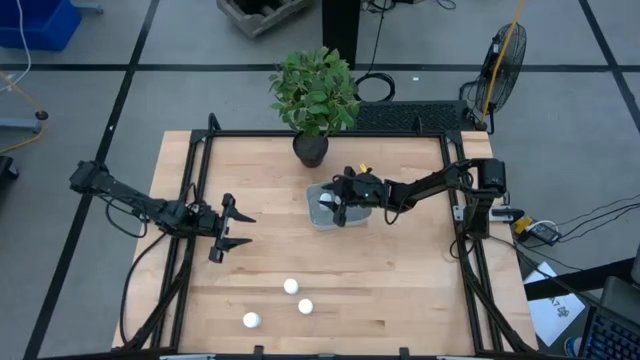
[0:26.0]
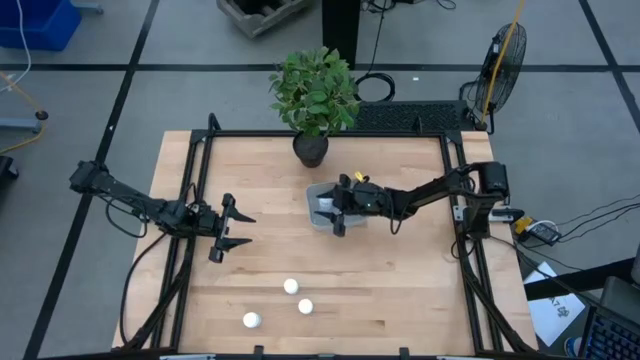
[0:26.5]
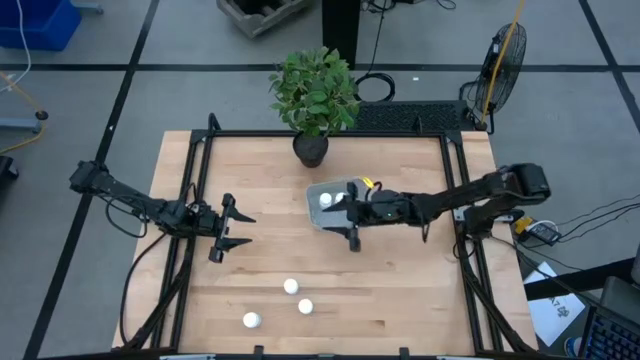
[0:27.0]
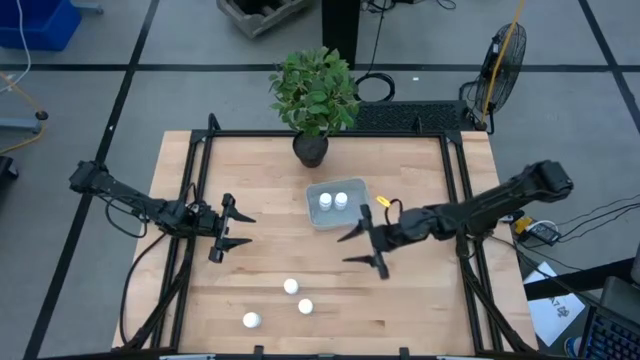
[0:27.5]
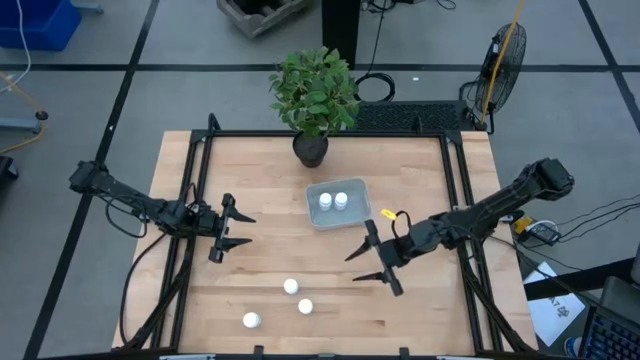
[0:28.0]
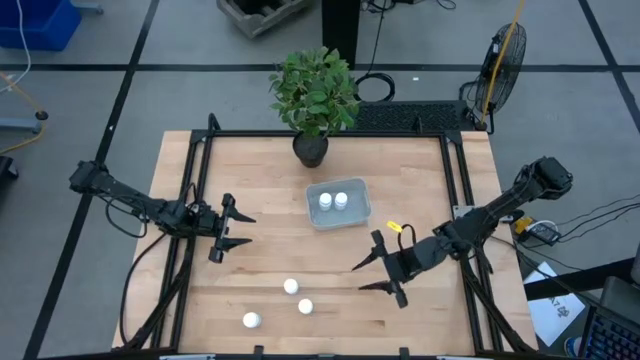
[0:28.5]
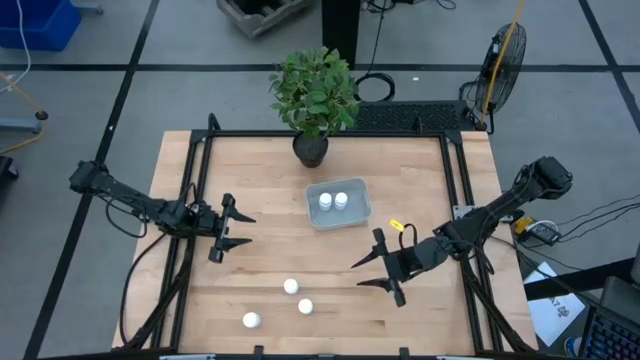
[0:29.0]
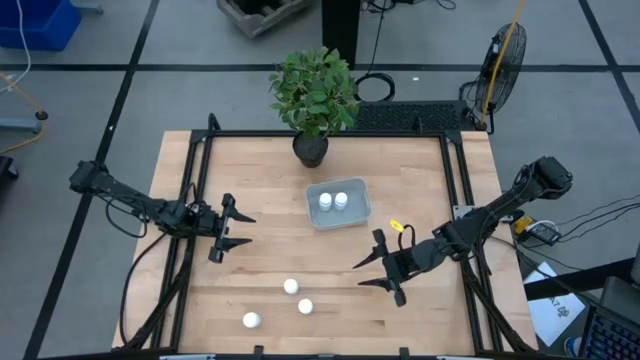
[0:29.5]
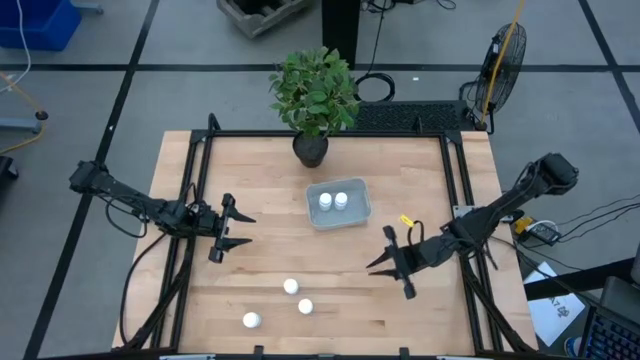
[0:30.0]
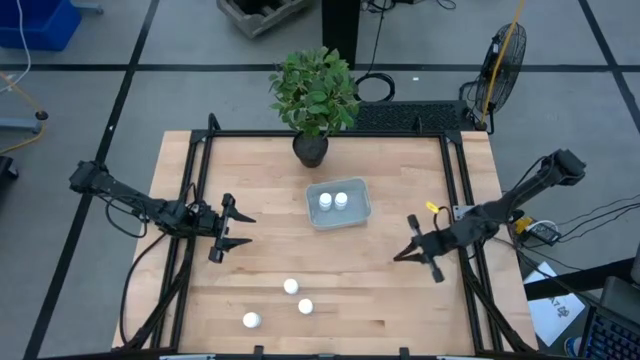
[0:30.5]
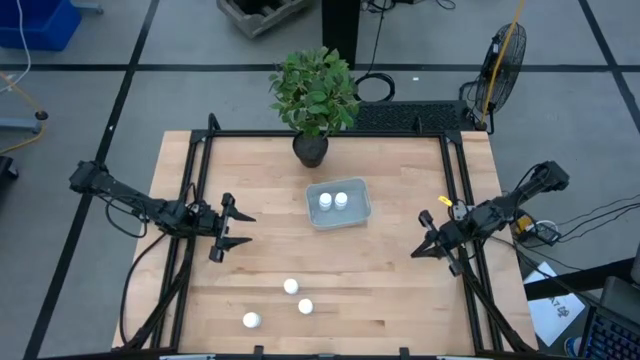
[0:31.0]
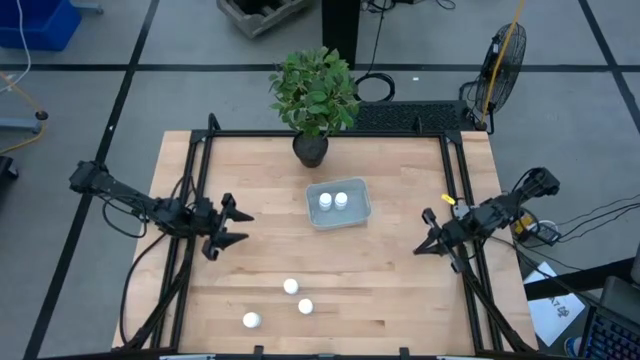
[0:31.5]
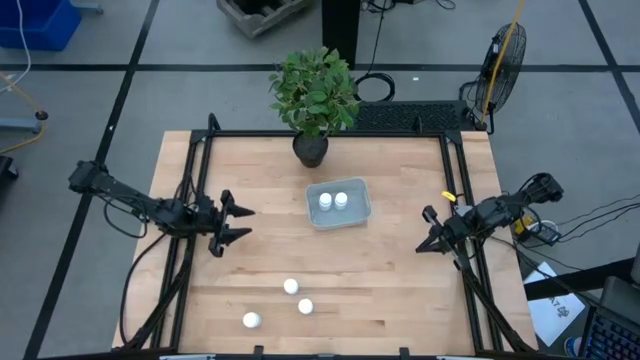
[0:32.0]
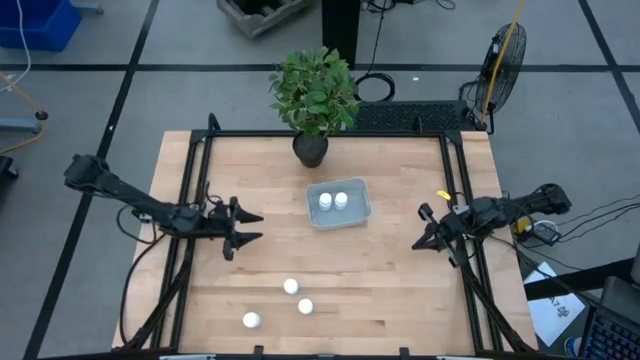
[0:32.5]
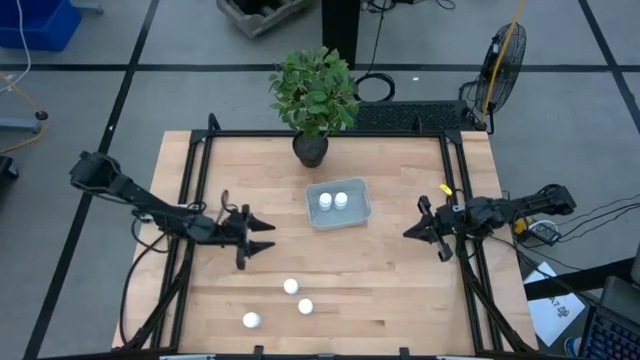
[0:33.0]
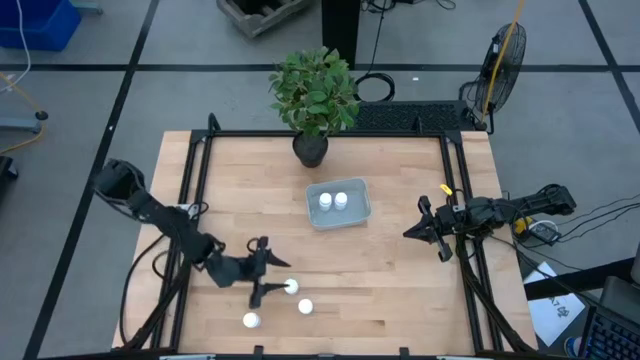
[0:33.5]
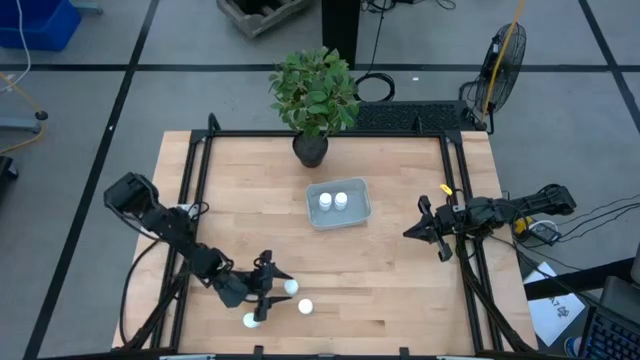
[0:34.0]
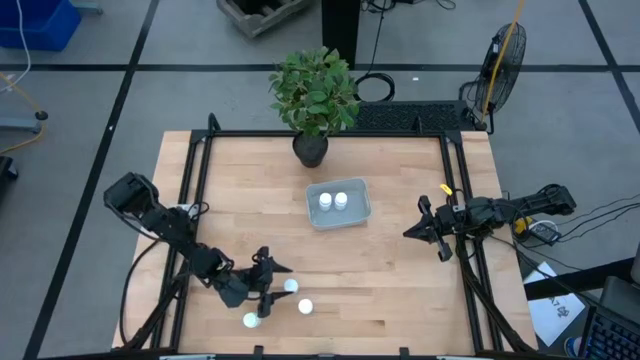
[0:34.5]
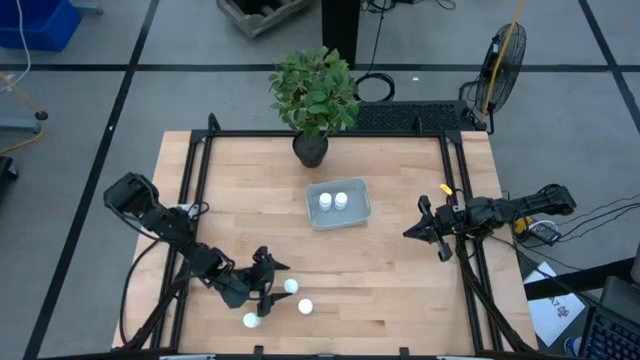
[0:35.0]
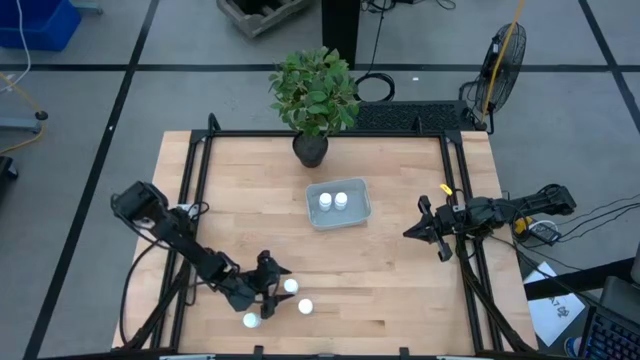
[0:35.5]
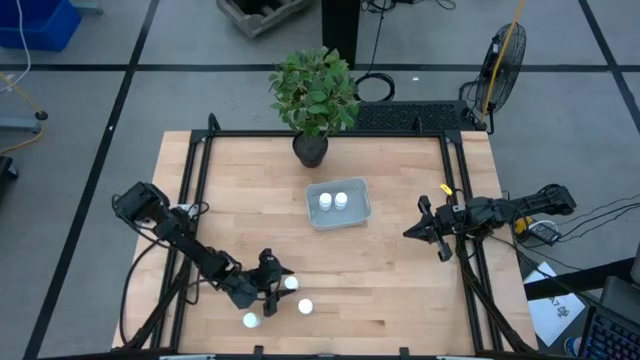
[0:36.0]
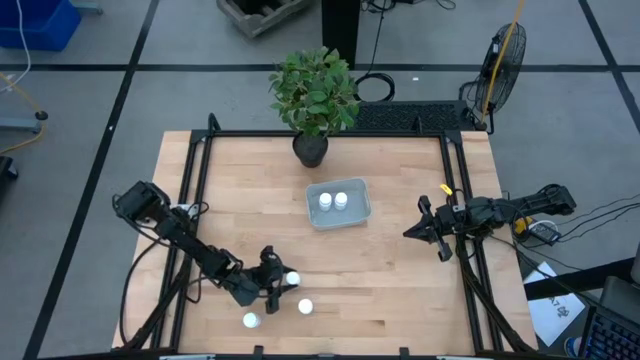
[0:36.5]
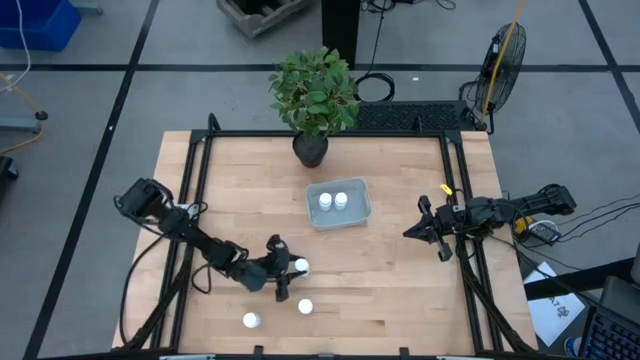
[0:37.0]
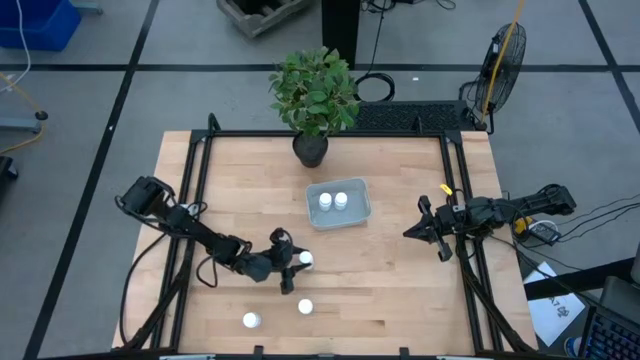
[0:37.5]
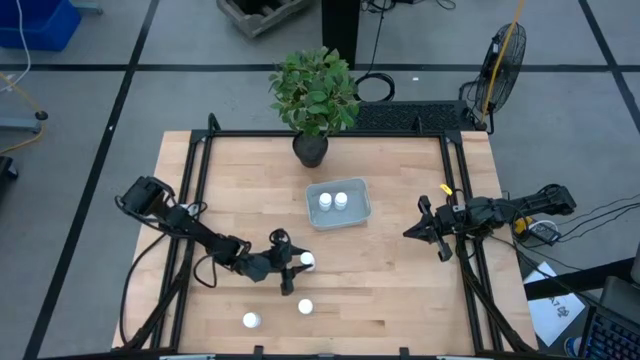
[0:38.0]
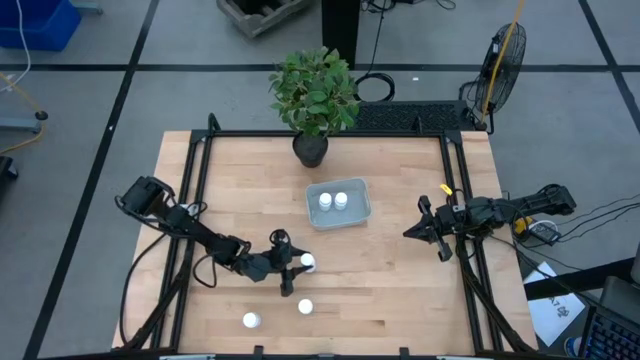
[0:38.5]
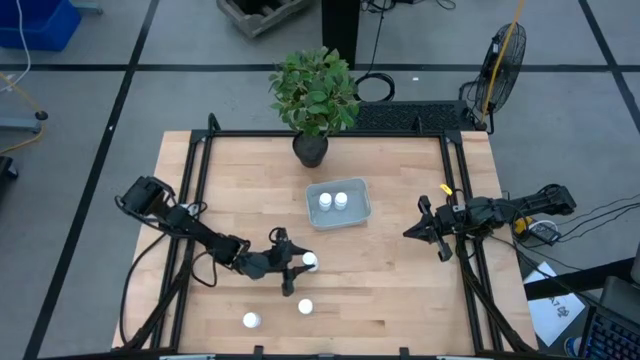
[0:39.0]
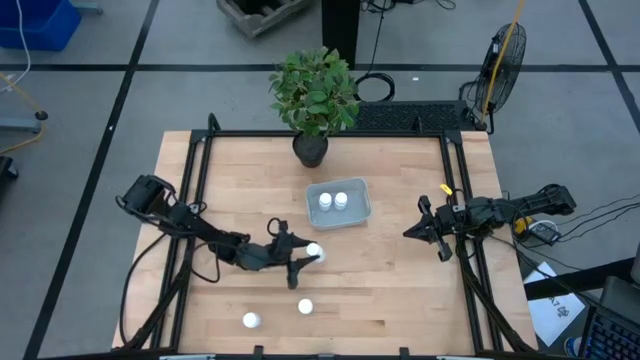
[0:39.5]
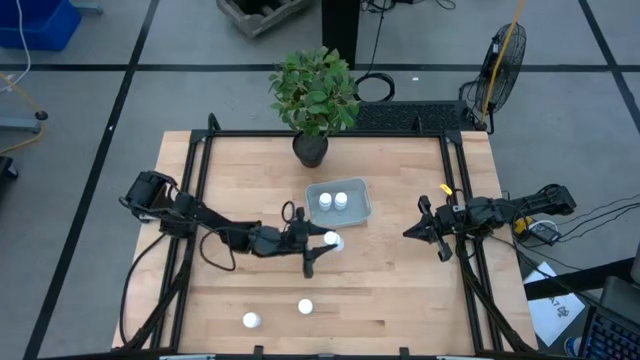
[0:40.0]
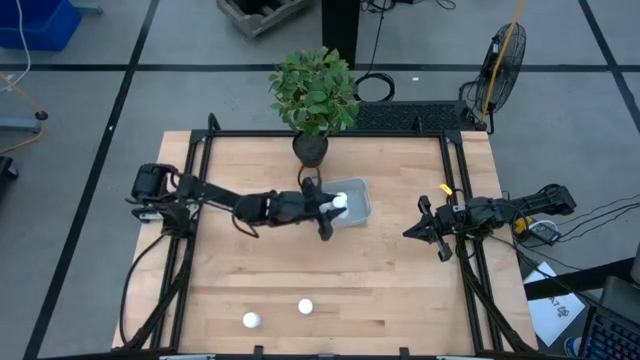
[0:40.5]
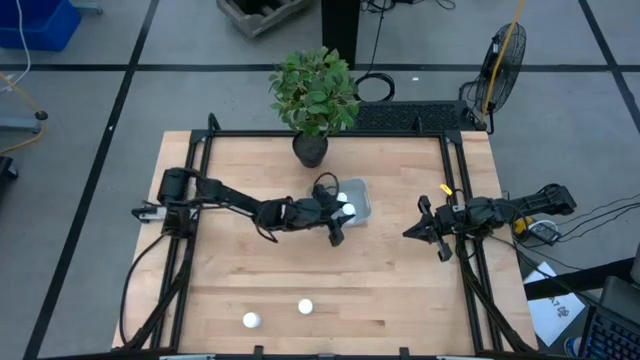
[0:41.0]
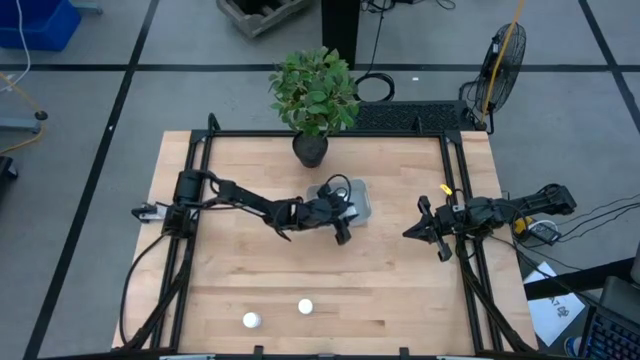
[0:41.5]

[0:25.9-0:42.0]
Task: Pick and place pill bottles into a basket
Put the white pill bottle into the gray bin

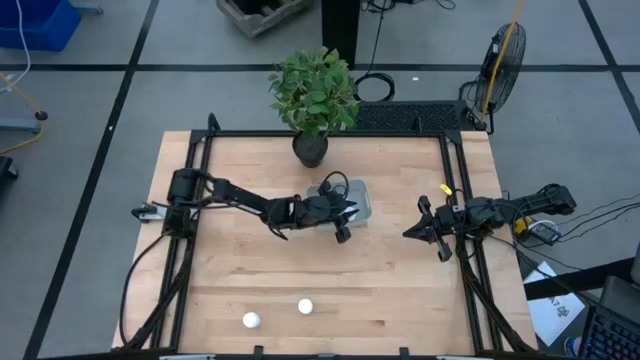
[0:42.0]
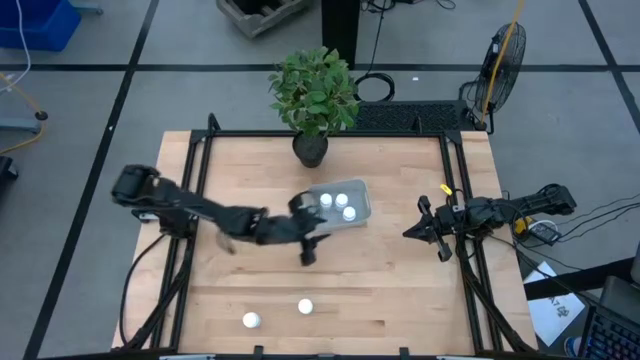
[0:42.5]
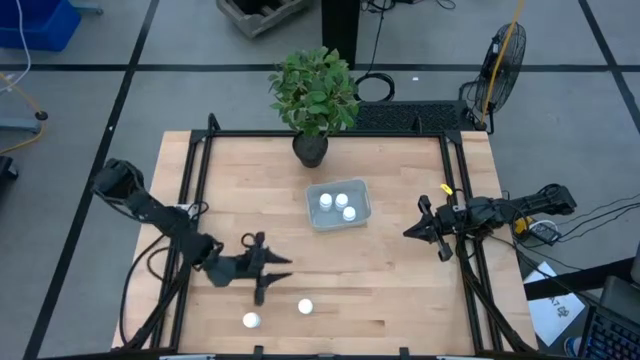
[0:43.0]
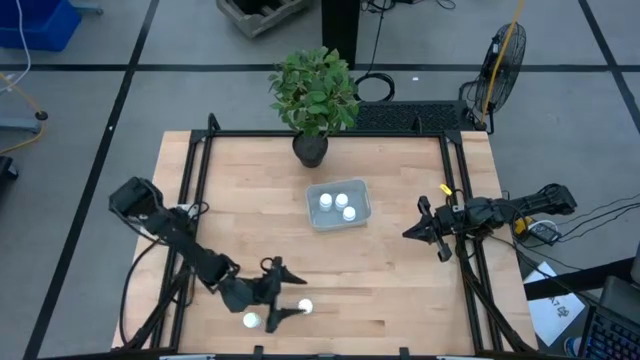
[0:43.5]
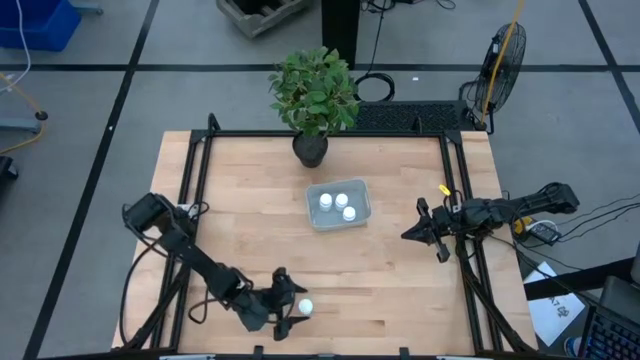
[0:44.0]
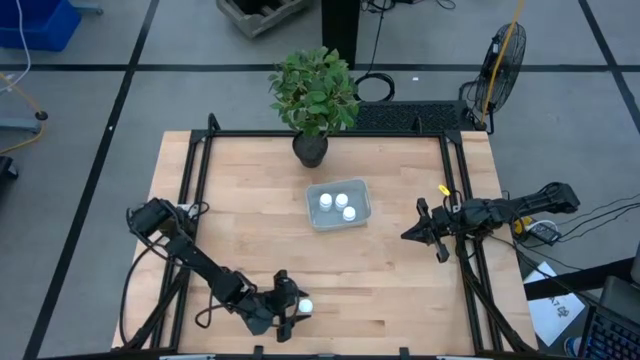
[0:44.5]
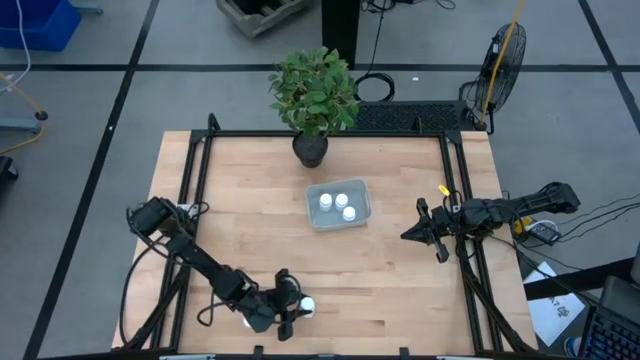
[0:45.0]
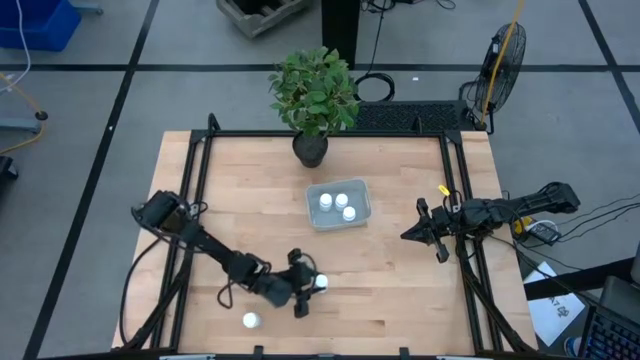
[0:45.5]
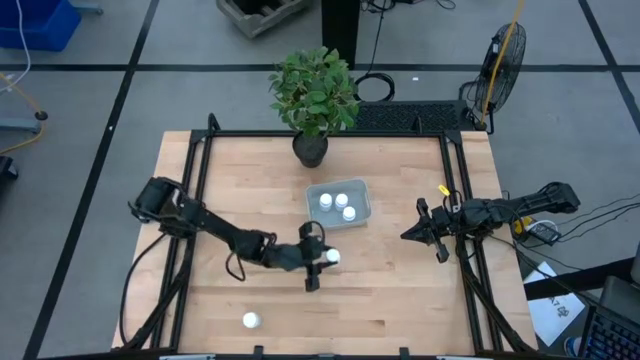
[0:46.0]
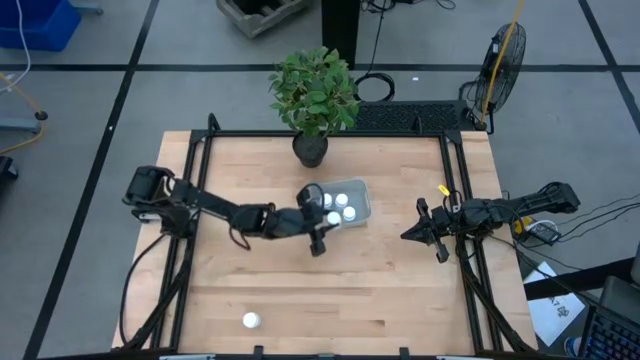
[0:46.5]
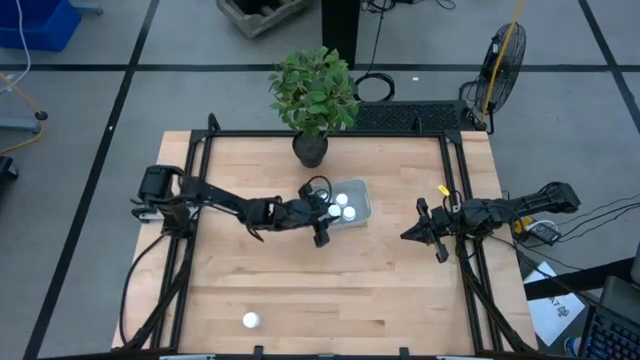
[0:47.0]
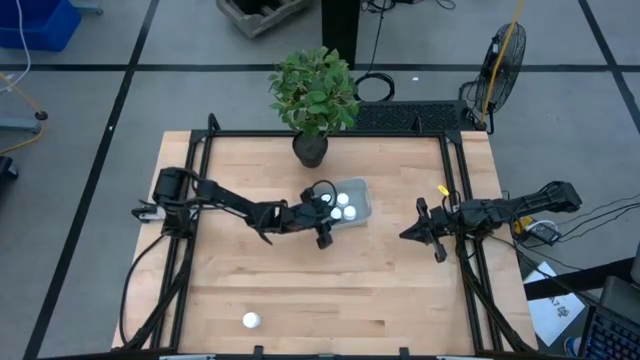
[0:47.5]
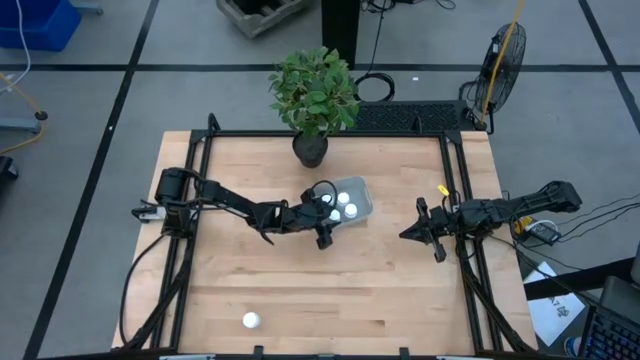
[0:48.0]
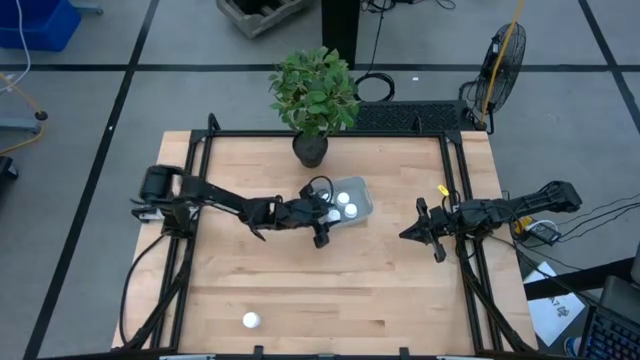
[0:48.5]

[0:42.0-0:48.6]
Put the white pill bottle into the gray bin
